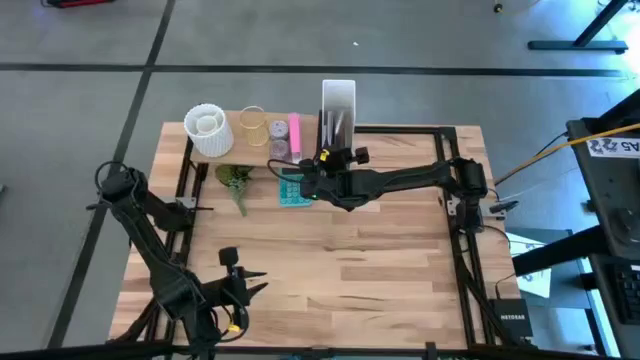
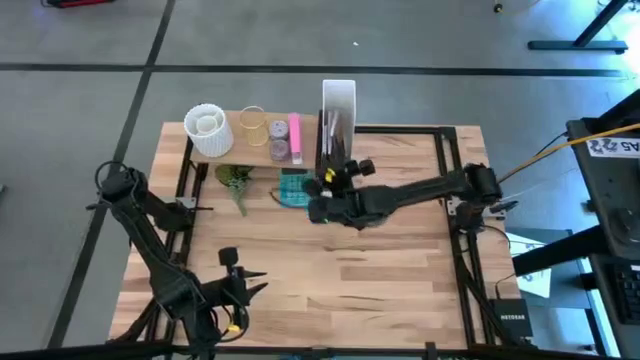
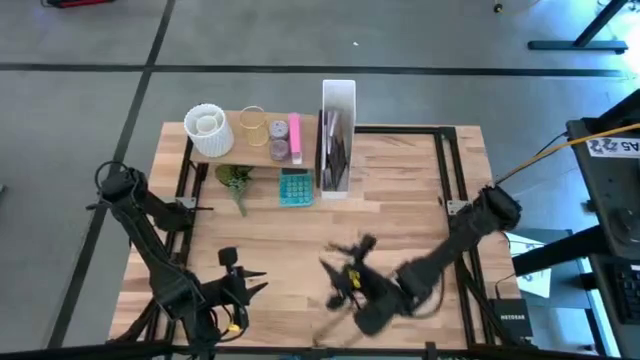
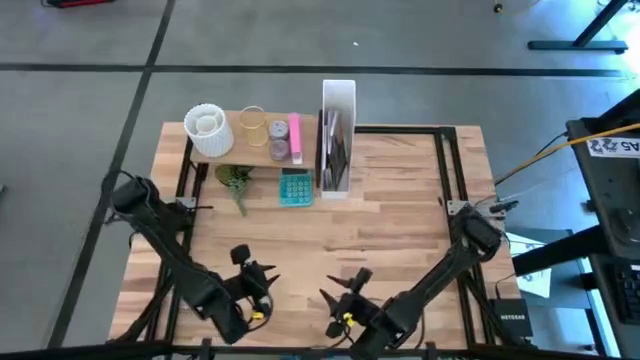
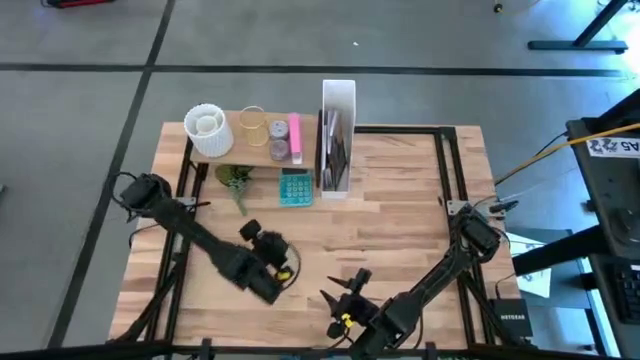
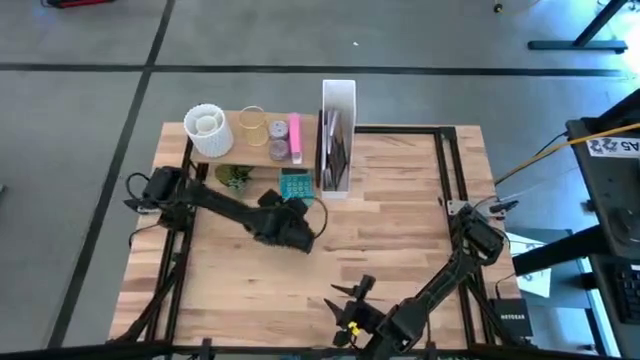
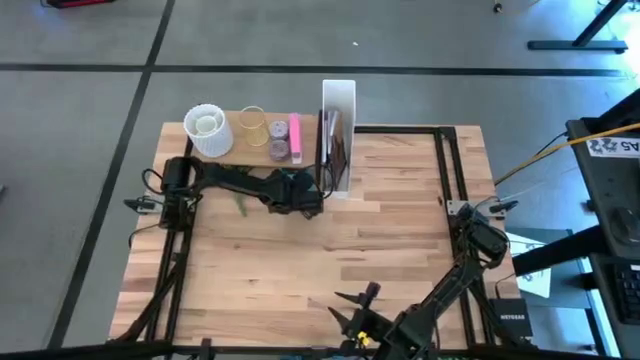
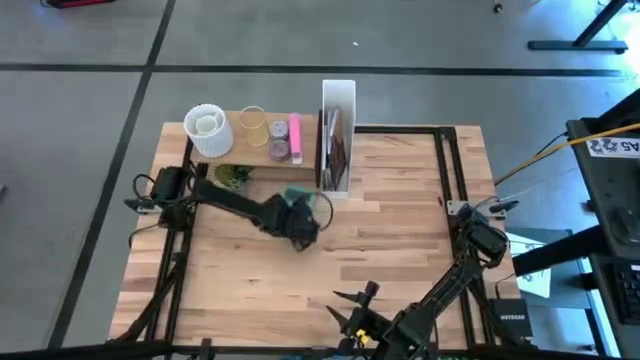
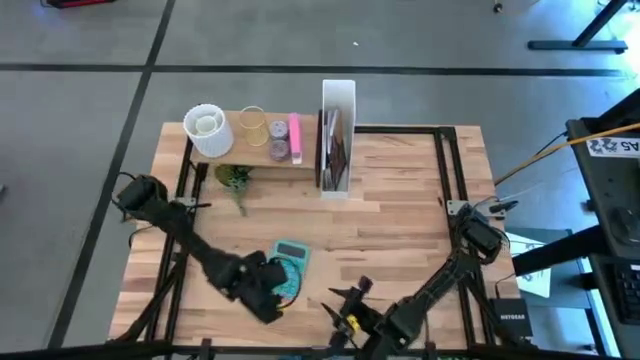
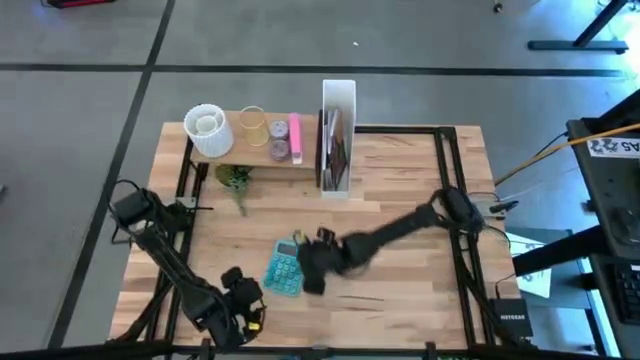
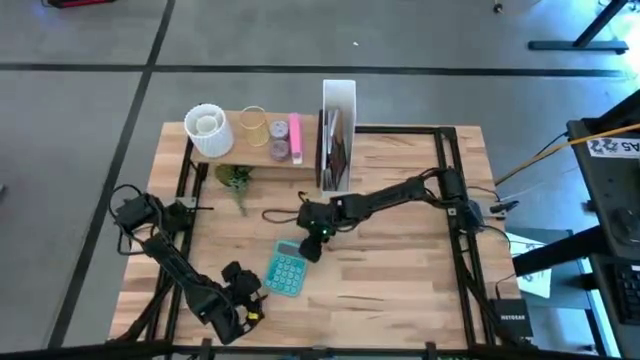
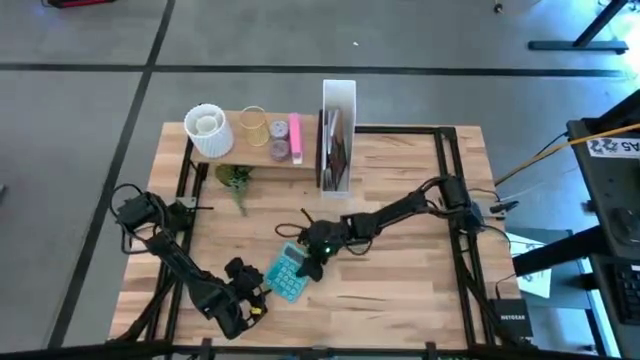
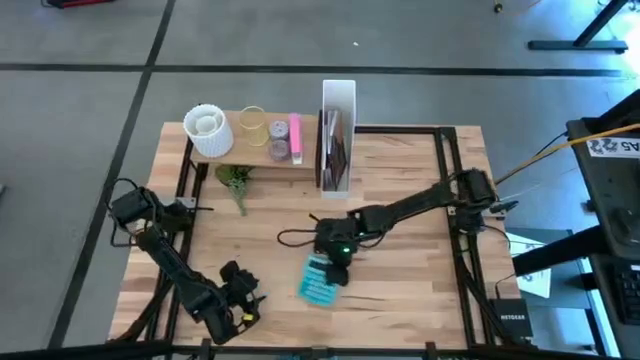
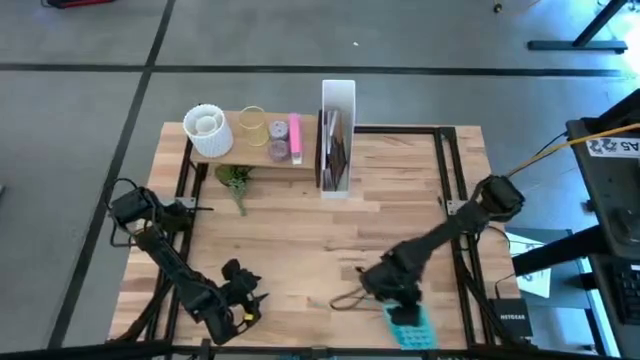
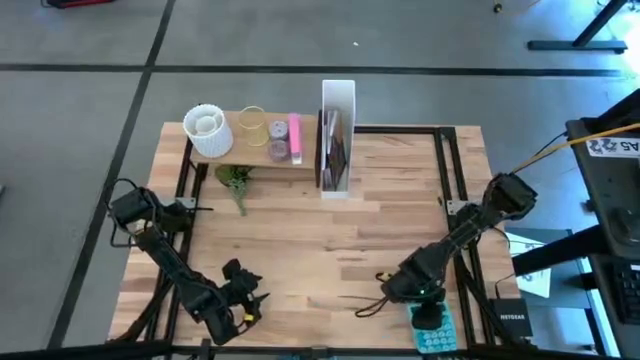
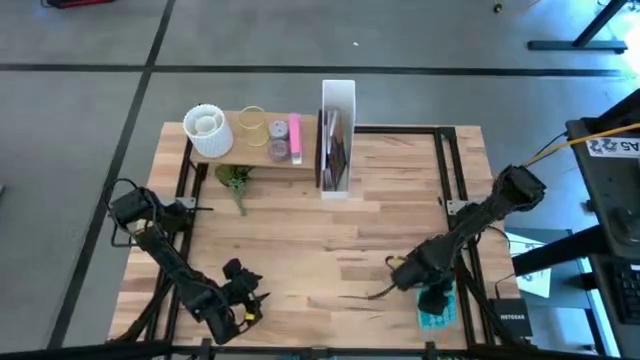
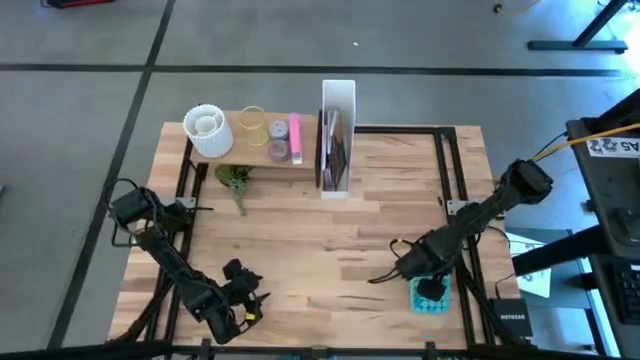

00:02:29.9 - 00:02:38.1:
Task: Stock shelves
Remove the blue calculator from under the shelf

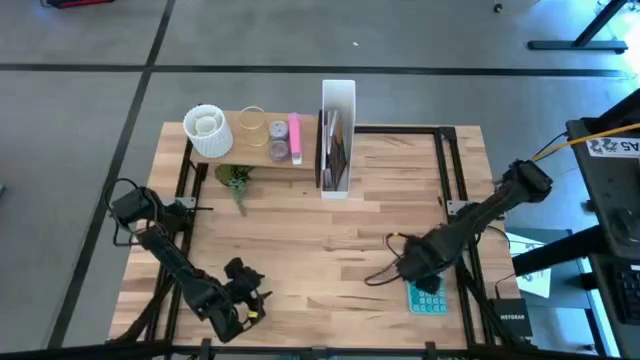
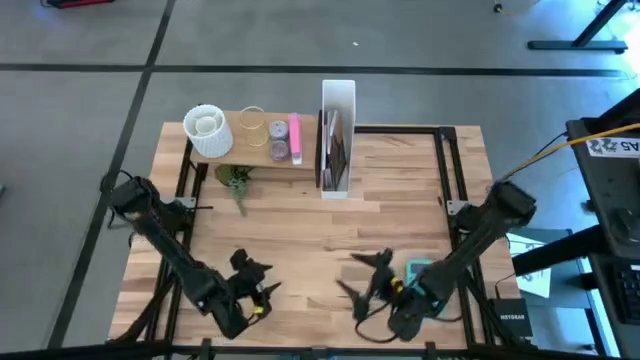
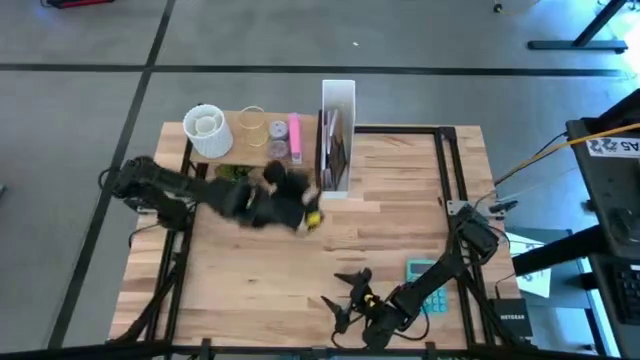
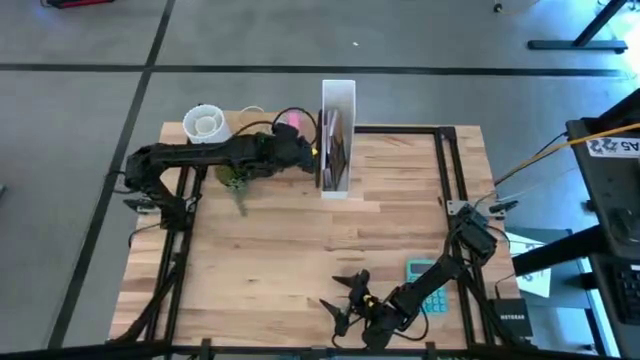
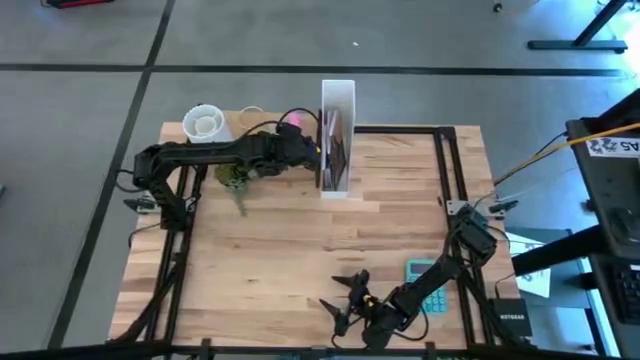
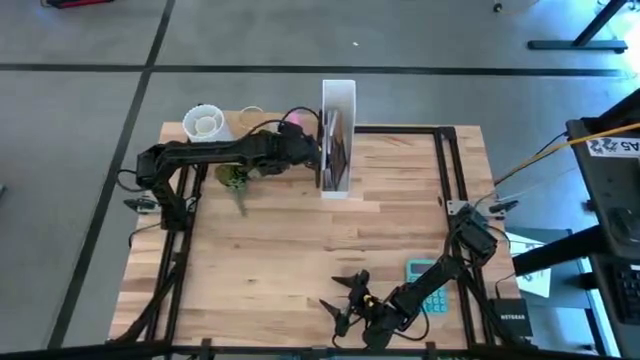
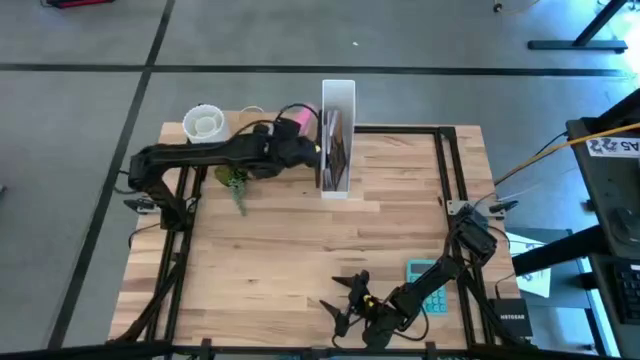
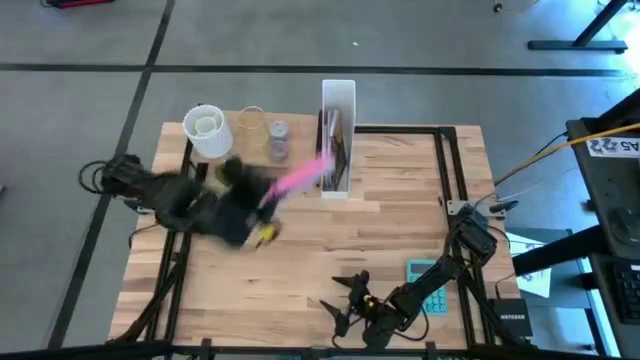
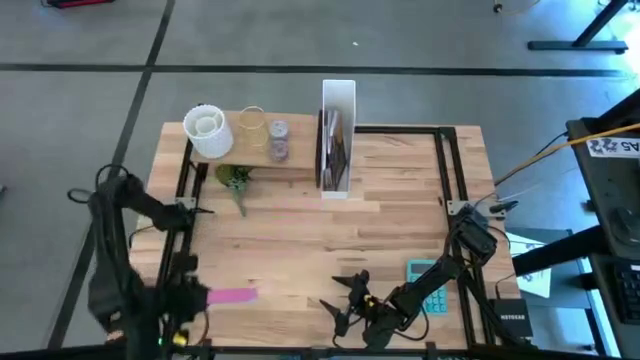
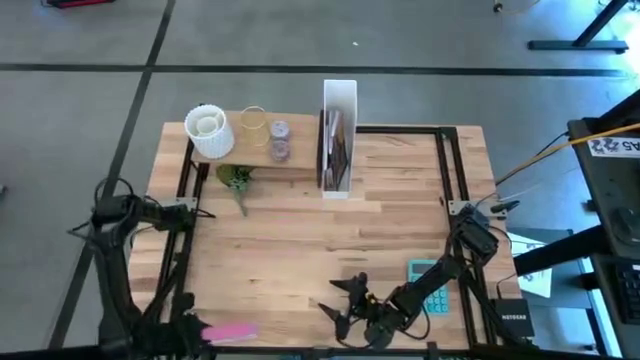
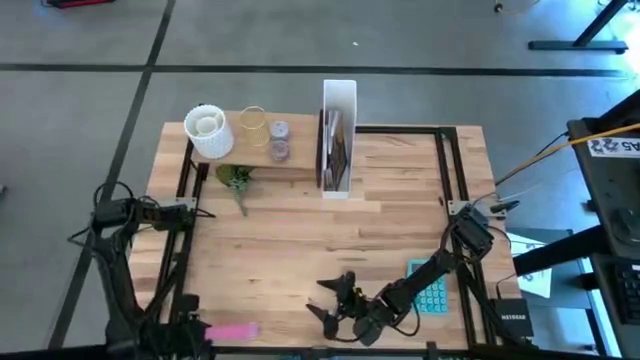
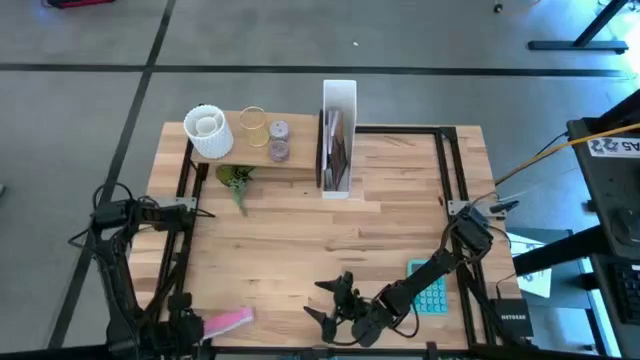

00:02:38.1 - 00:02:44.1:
Remove the pink stapler from the shelf

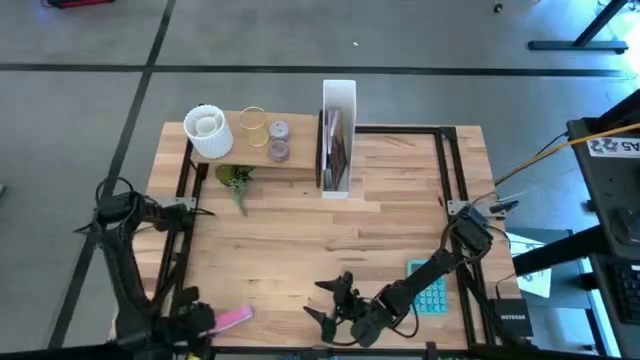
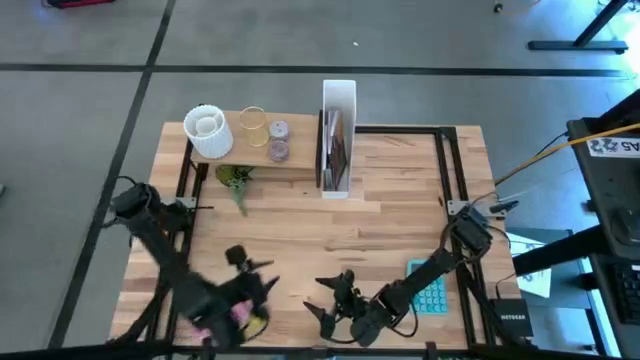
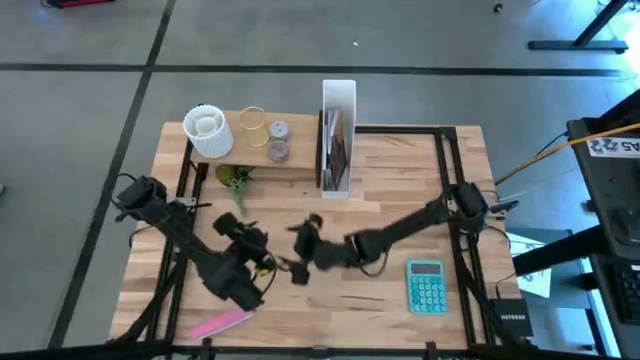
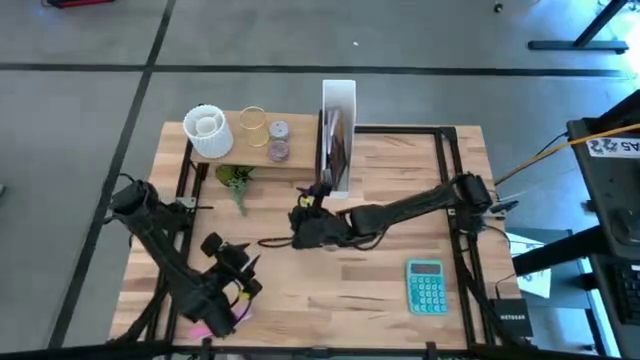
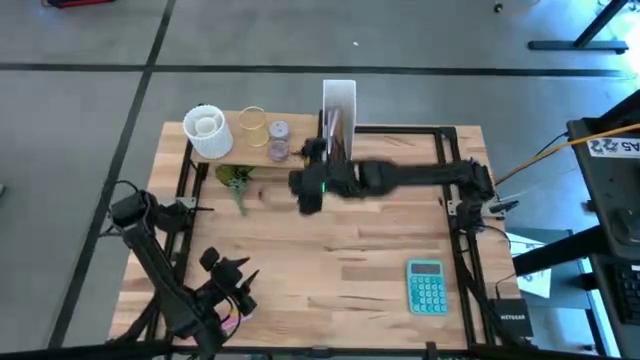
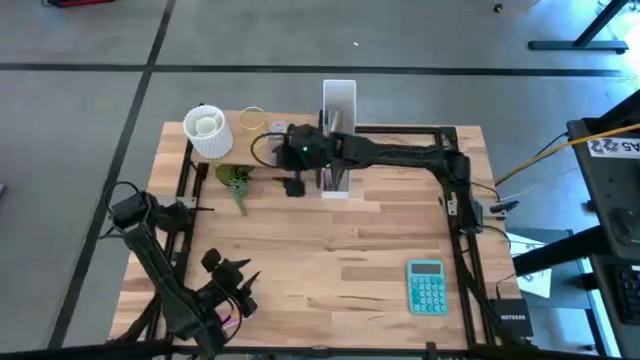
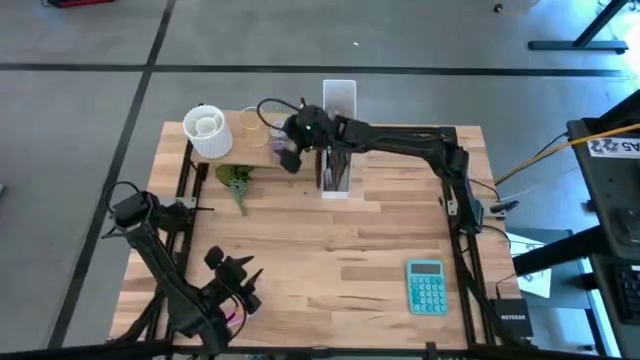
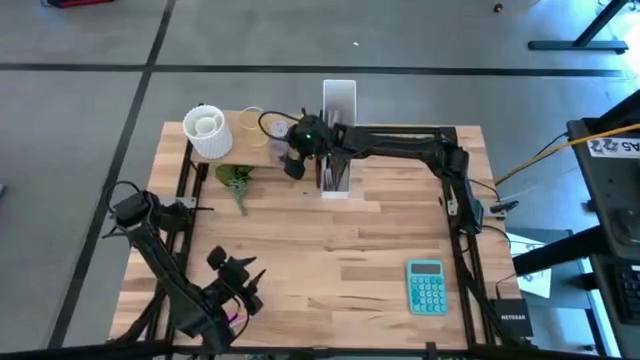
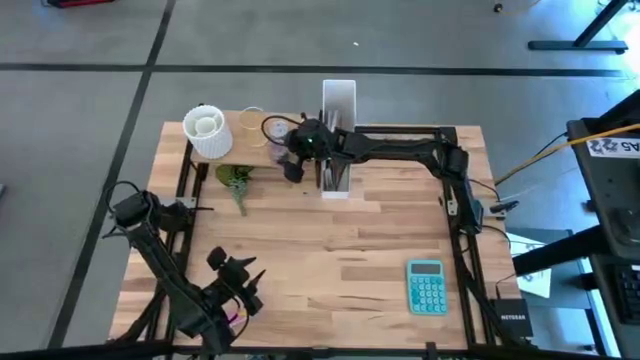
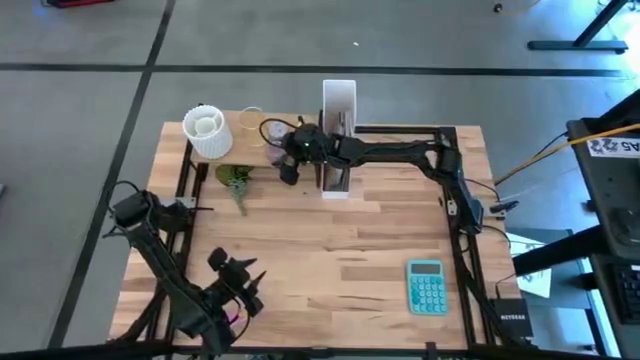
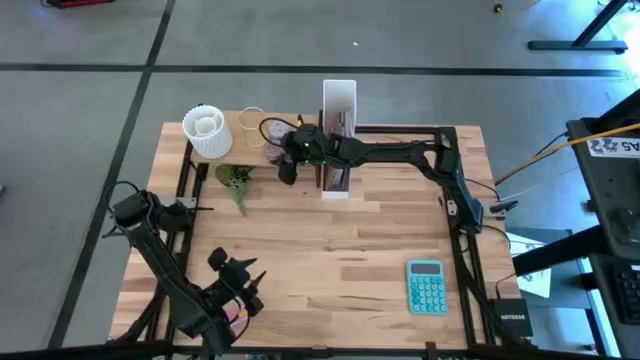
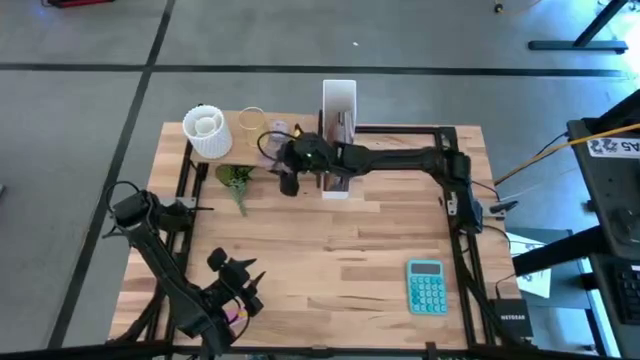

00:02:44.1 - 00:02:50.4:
Remove the red pattern scented candle from the shelf

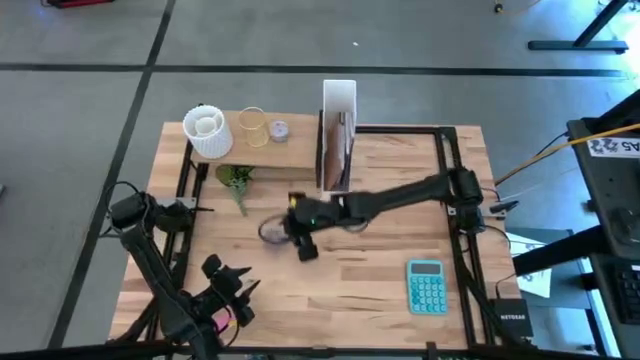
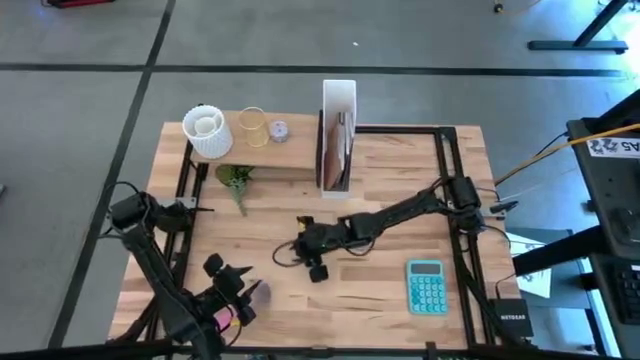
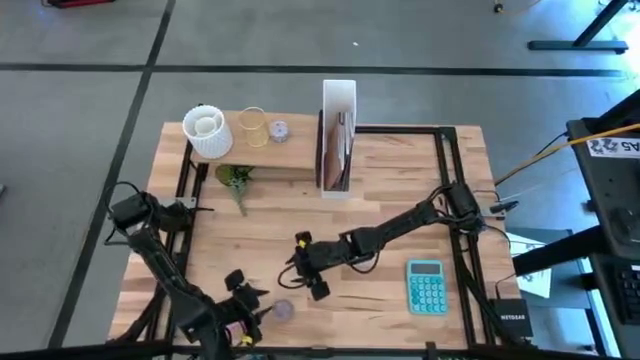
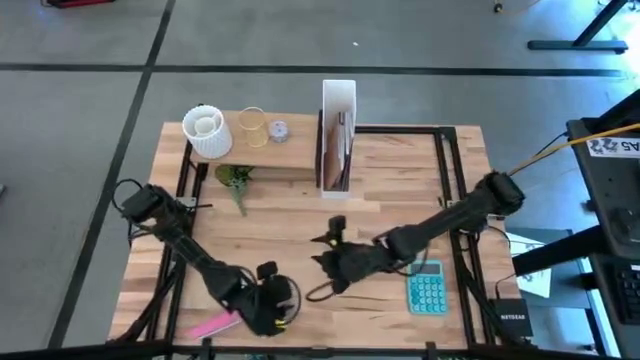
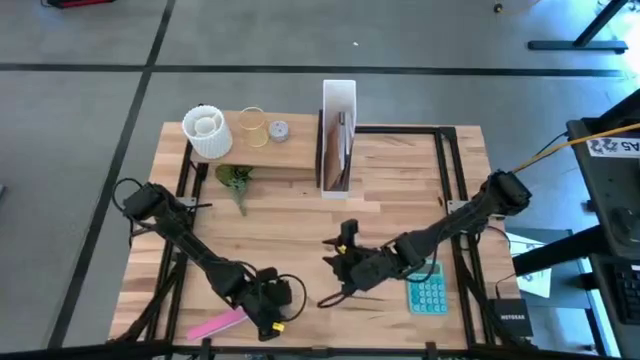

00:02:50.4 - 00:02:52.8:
Remove the red pattern scented candle from the shelf
